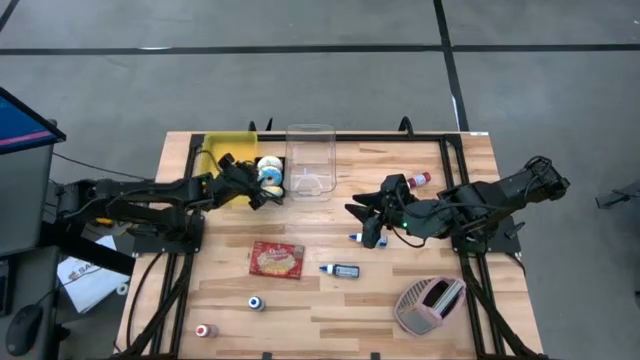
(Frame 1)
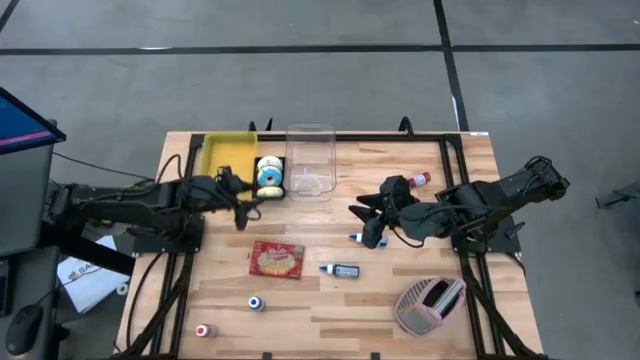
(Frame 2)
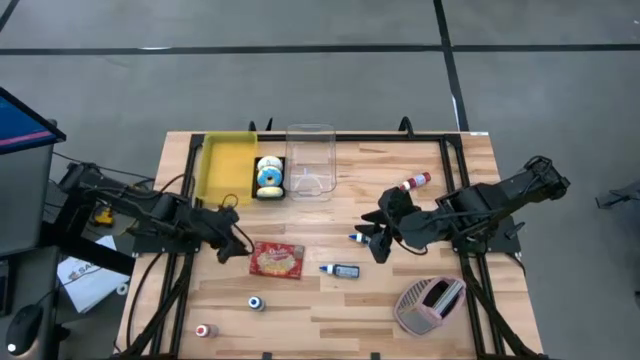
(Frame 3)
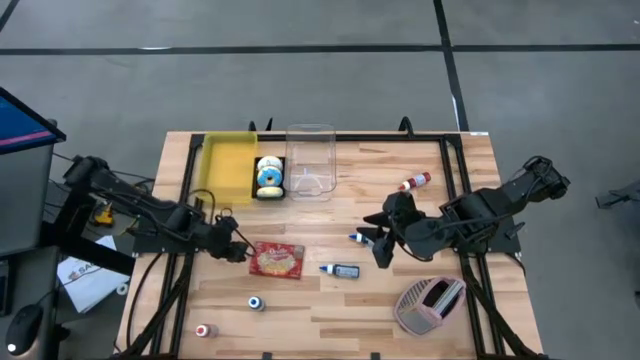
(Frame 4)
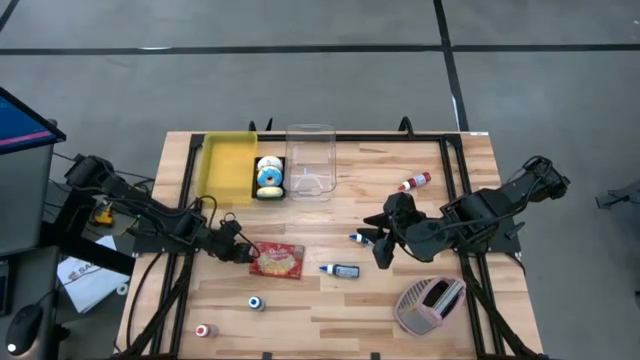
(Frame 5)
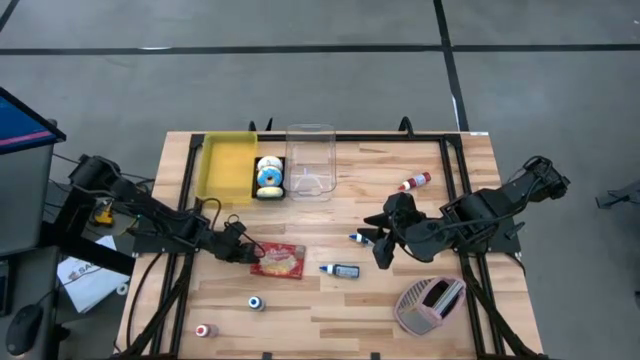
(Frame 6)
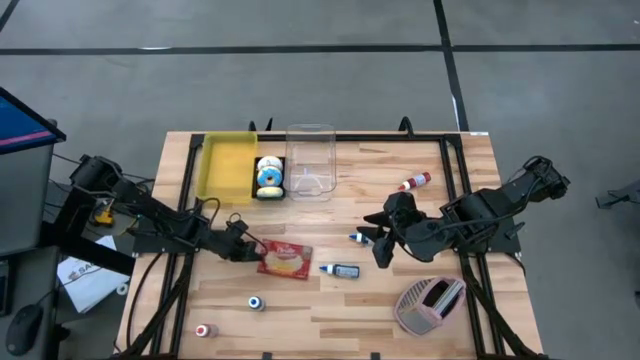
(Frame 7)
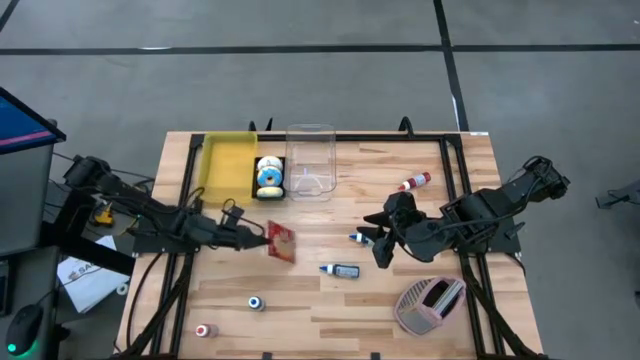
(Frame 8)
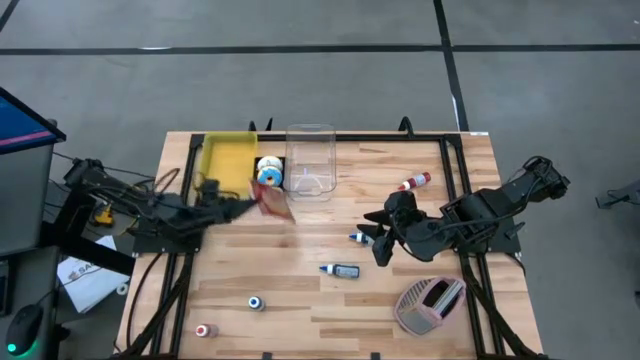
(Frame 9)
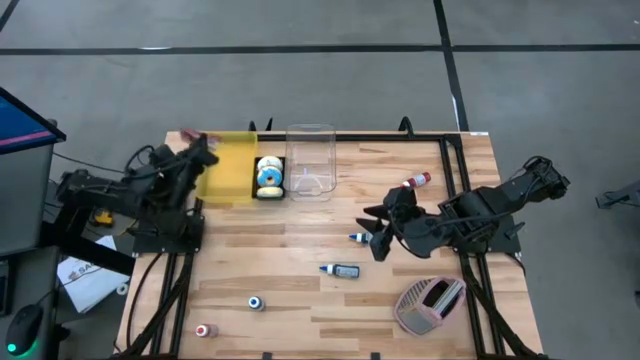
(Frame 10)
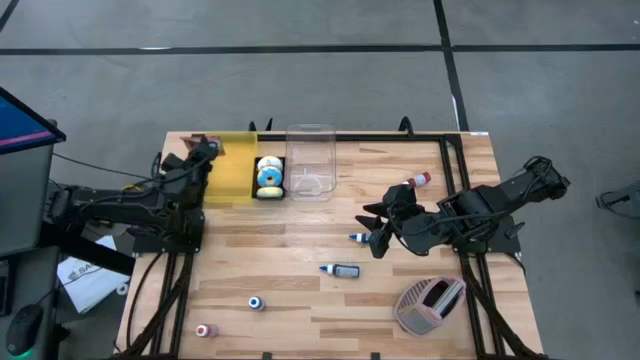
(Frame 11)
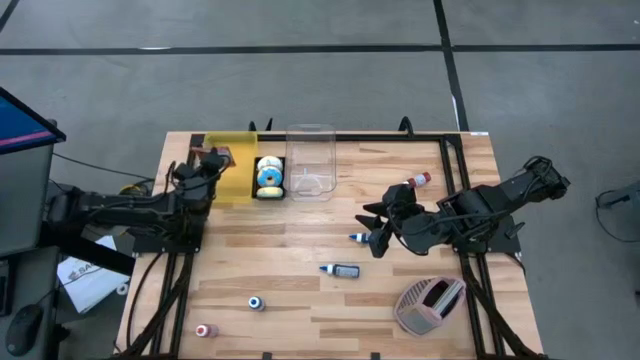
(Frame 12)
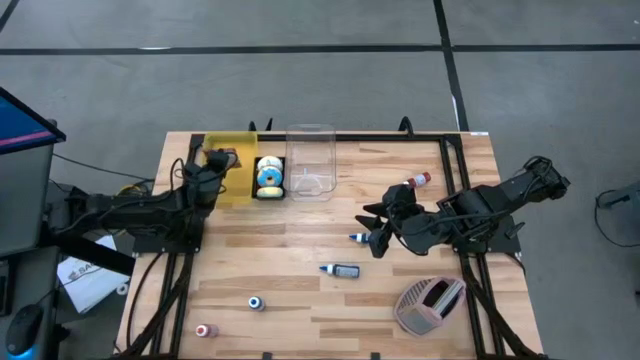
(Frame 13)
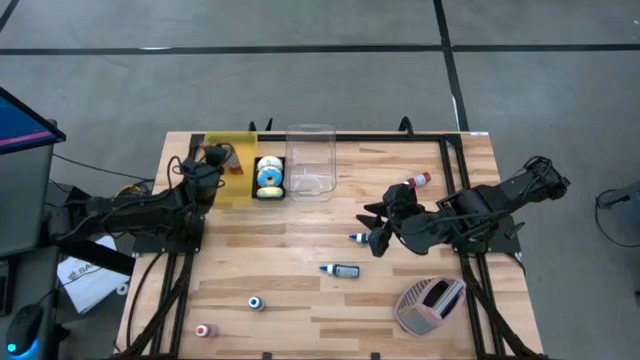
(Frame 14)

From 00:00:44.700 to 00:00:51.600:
Put the red popcorn bag into the yellow bin

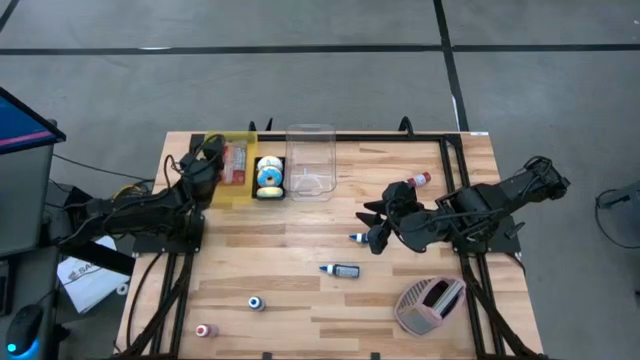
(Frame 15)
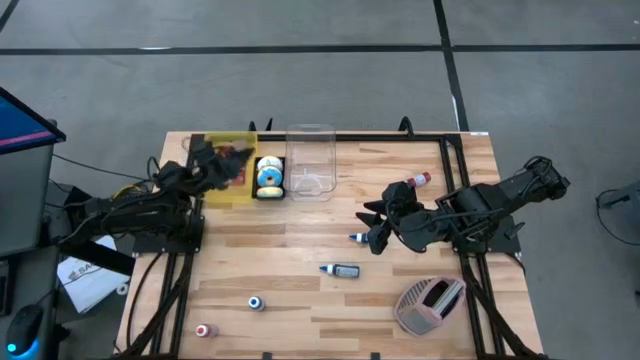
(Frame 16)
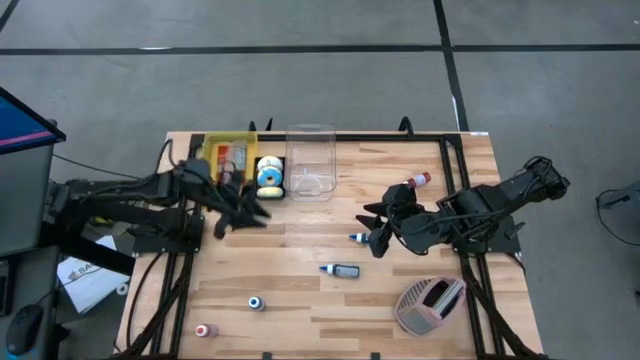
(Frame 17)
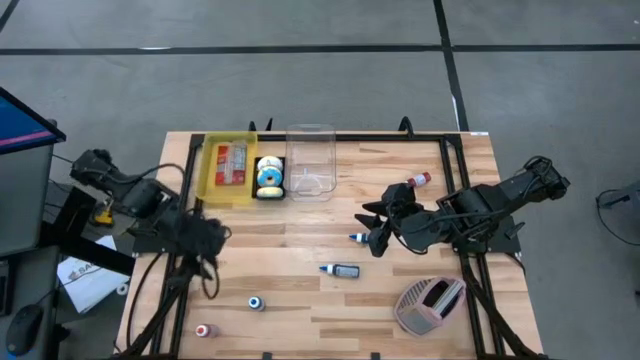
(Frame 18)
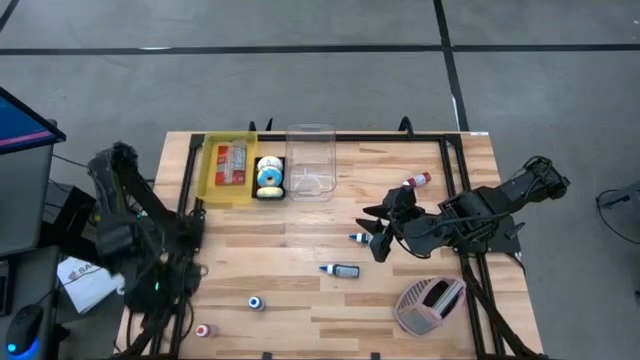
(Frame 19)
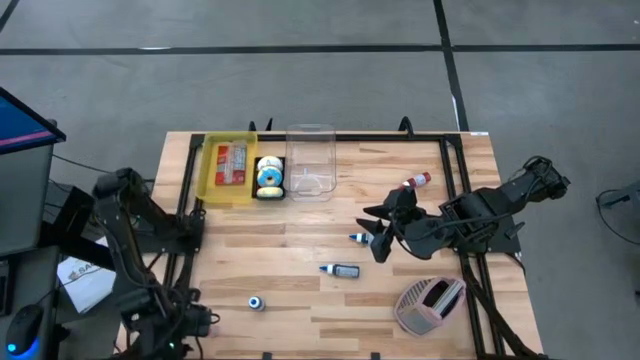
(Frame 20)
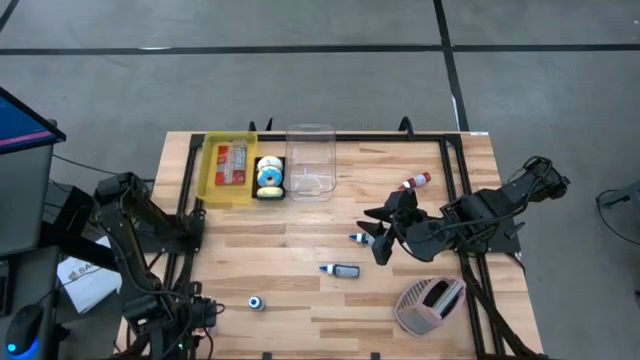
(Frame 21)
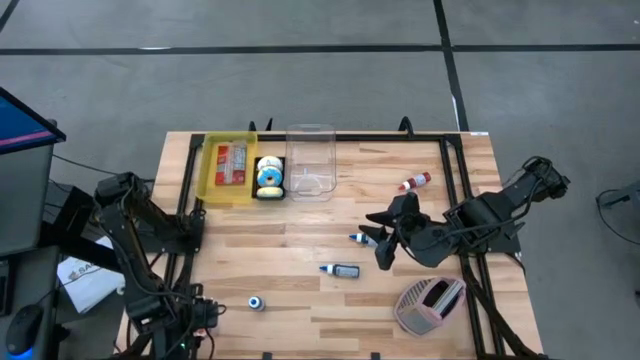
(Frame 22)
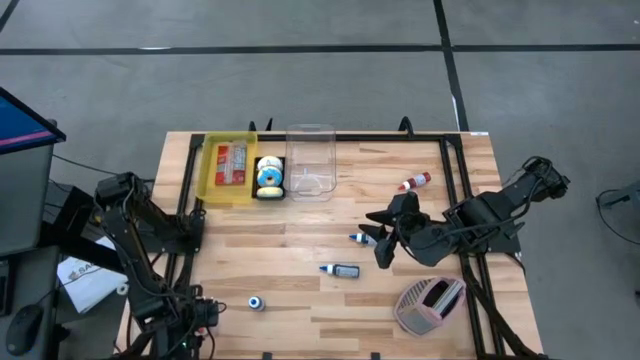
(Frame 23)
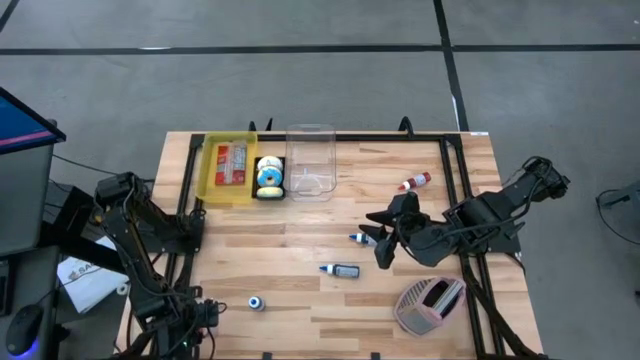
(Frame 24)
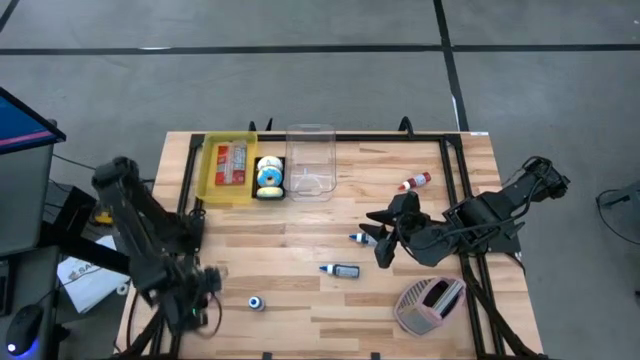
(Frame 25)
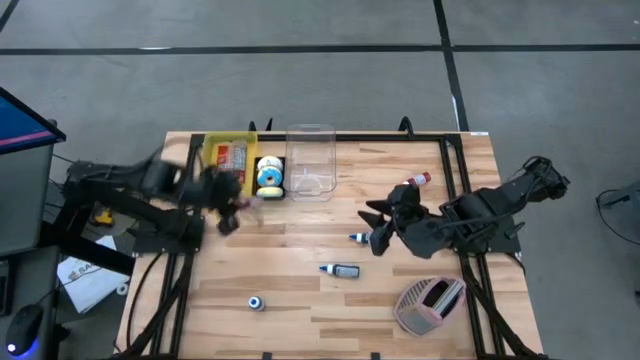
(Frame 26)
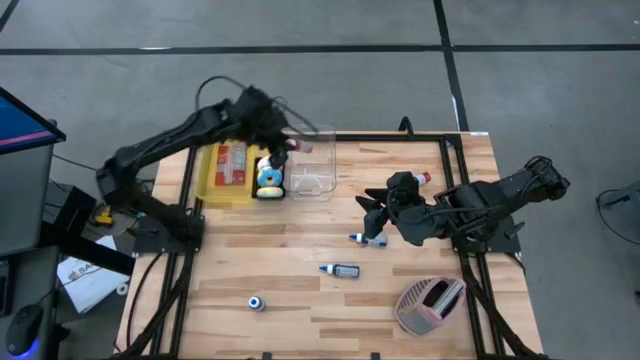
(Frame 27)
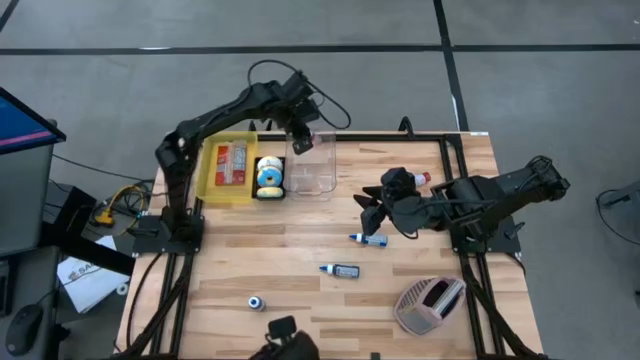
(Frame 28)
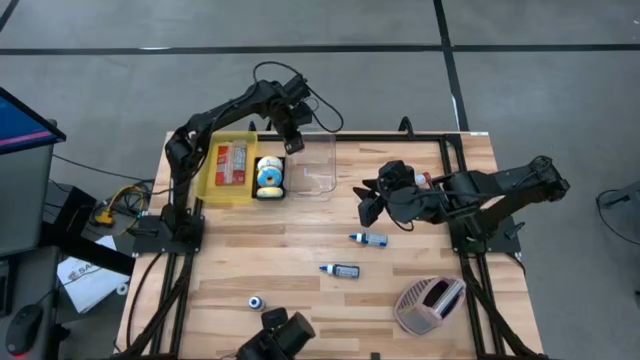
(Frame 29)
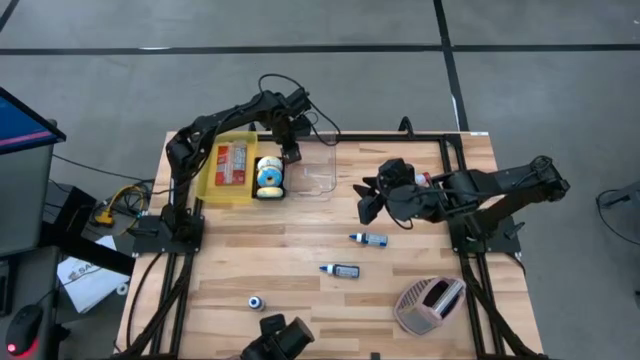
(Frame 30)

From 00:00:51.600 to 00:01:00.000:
Put the orange food coloring bottle into the transparent bin

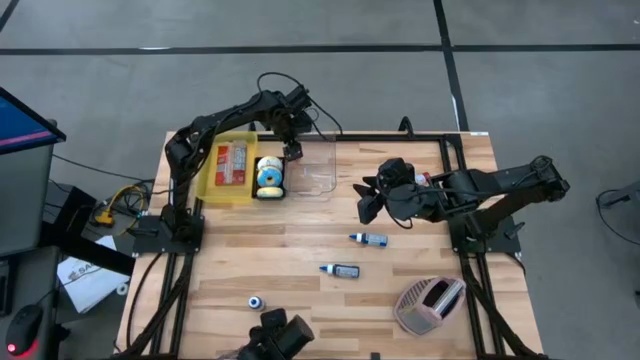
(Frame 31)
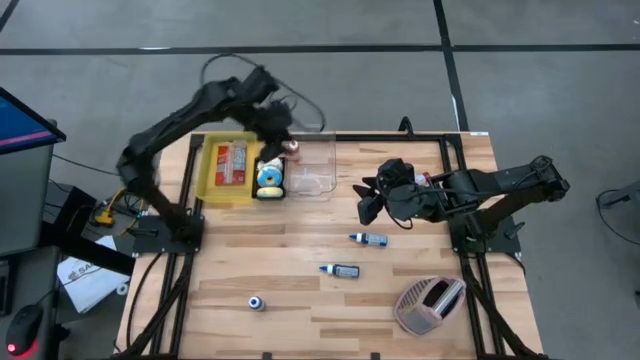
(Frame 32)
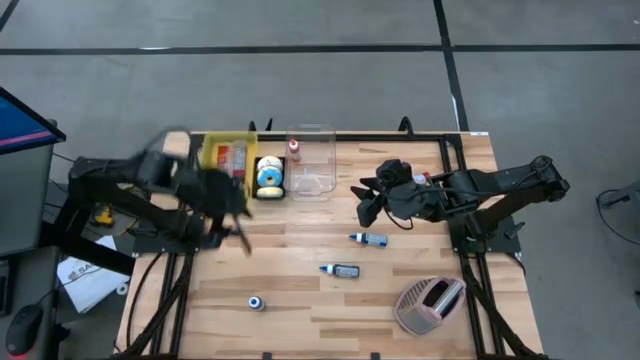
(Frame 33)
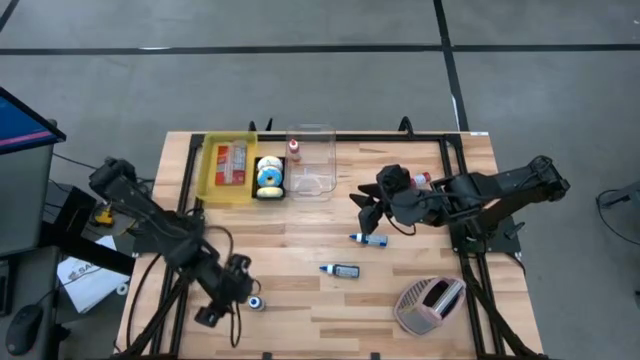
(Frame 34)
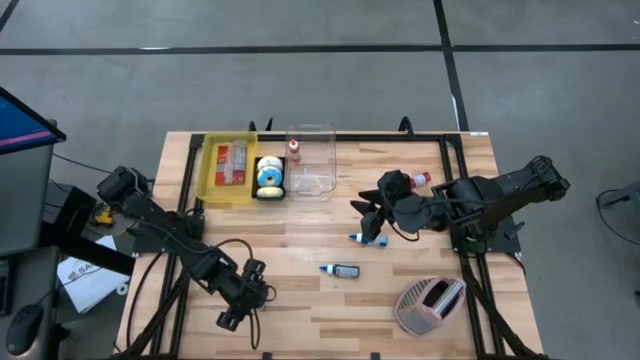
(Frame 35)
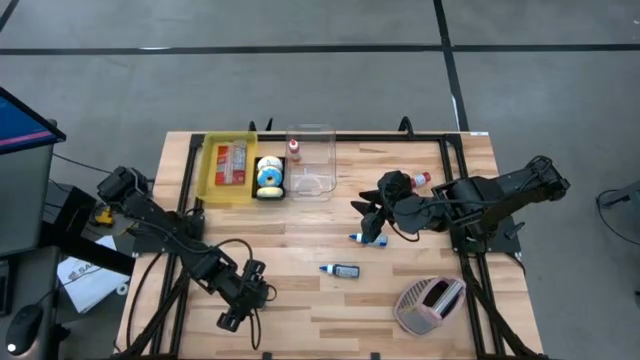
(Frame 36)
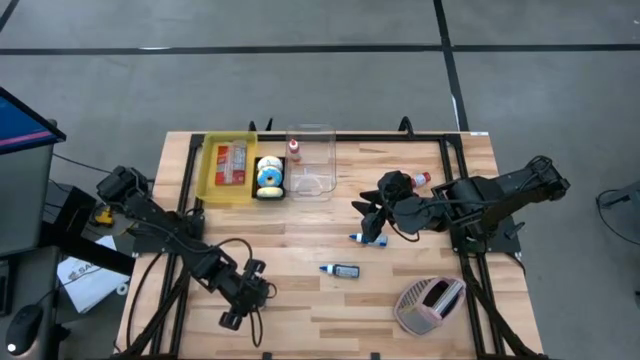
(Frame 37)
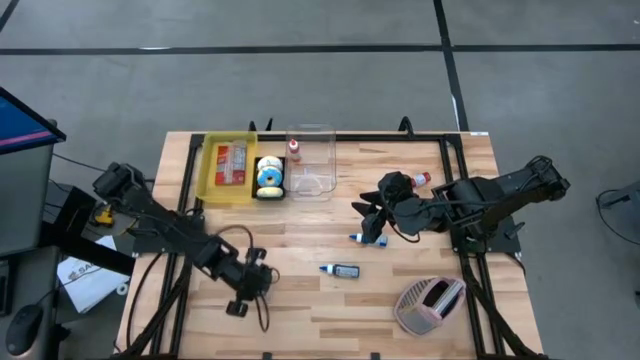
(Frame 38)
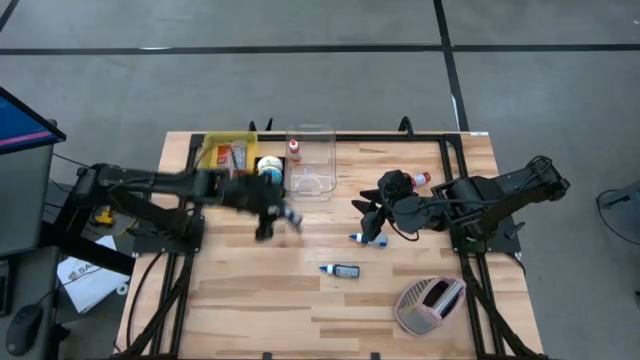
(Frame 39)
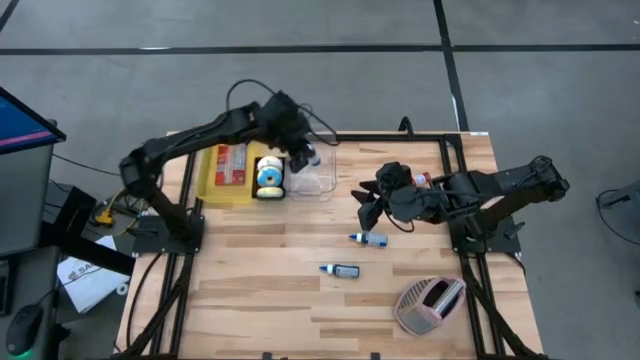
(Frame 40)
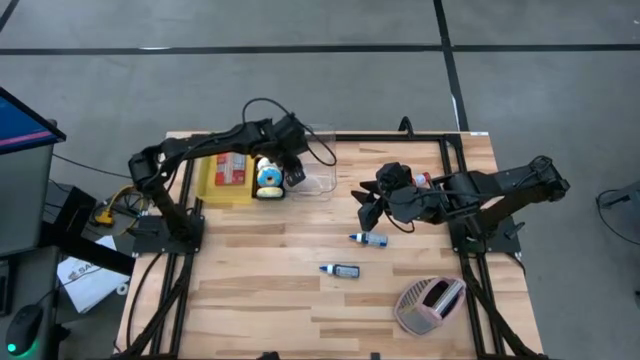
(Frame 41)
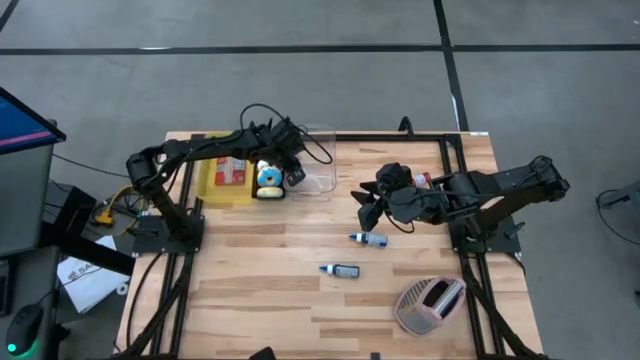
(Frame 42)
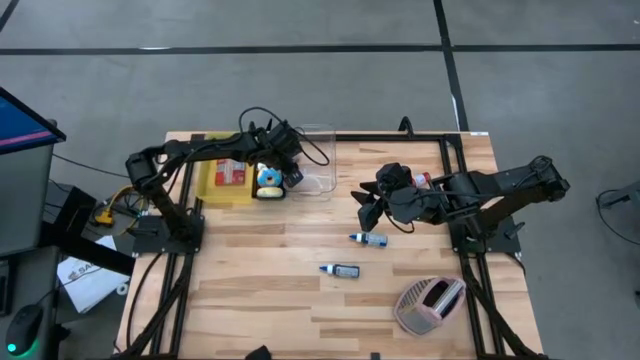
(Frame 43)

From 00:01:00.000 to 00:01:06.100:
Put the bottom blue food coloring bottle into the transparent bin
